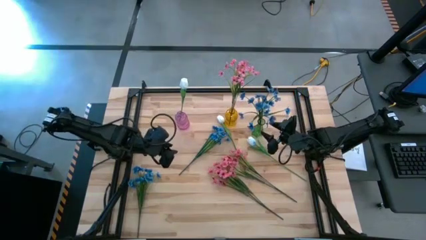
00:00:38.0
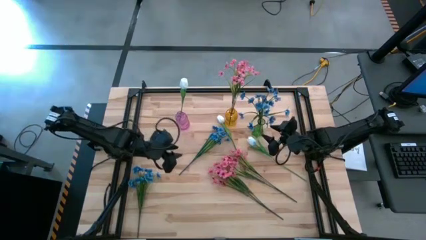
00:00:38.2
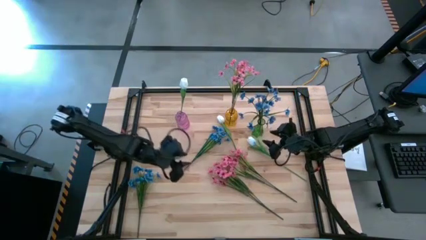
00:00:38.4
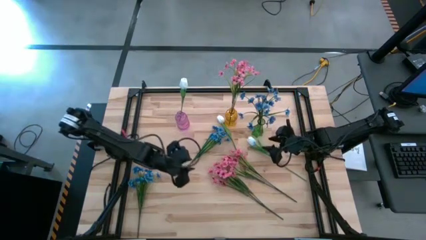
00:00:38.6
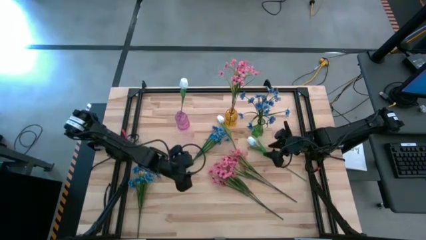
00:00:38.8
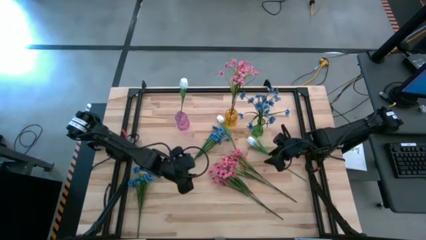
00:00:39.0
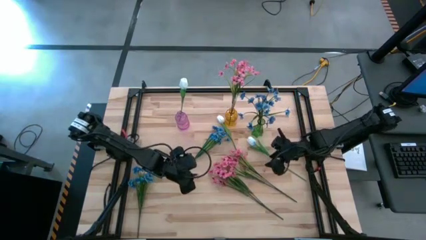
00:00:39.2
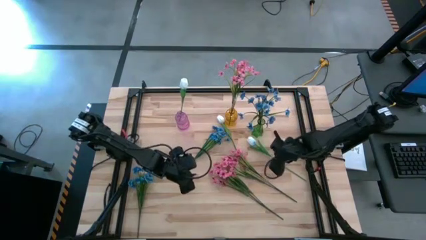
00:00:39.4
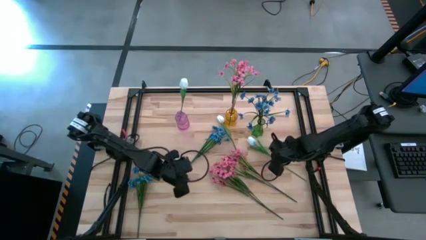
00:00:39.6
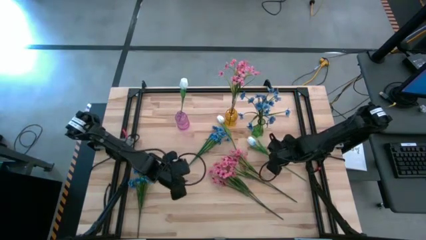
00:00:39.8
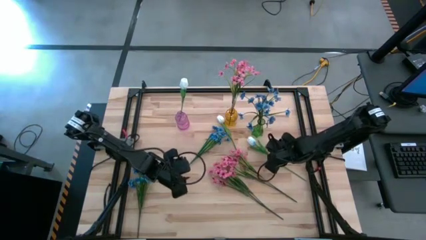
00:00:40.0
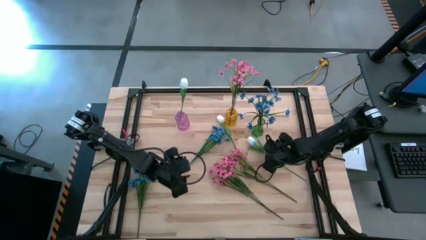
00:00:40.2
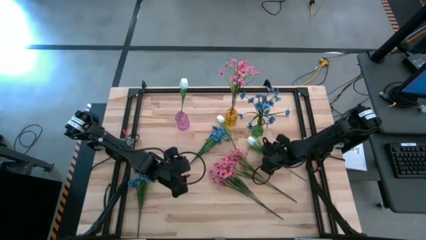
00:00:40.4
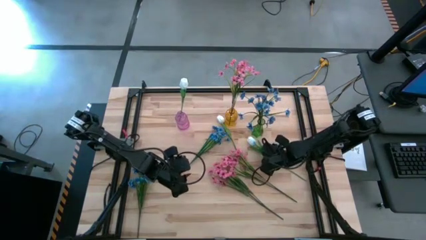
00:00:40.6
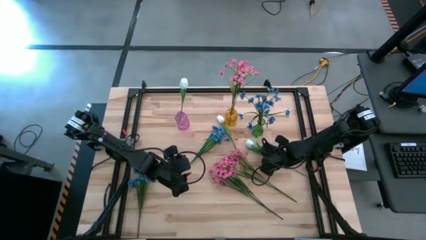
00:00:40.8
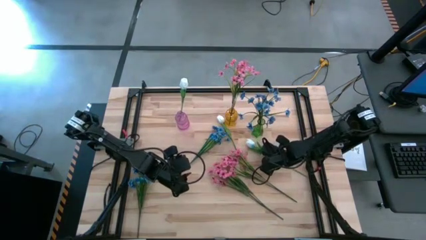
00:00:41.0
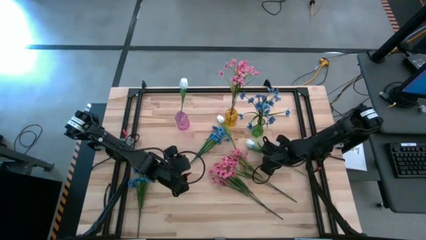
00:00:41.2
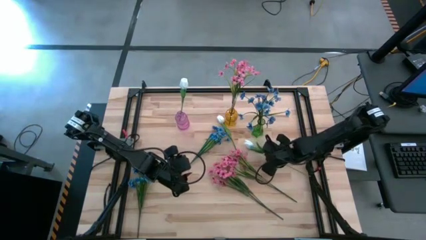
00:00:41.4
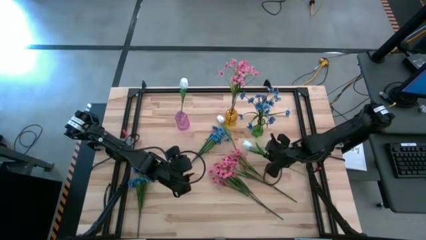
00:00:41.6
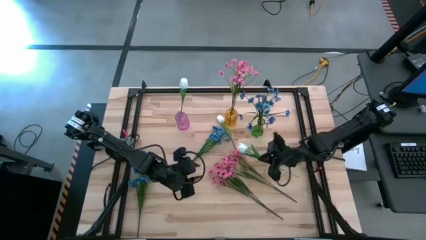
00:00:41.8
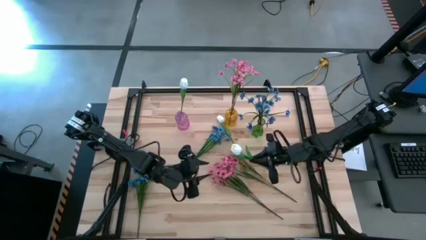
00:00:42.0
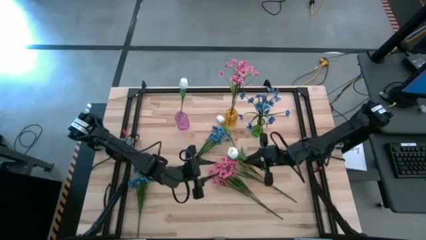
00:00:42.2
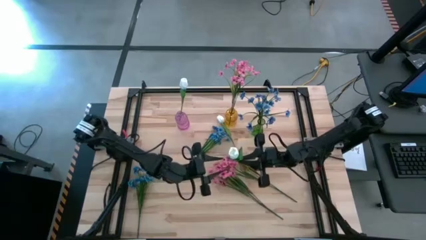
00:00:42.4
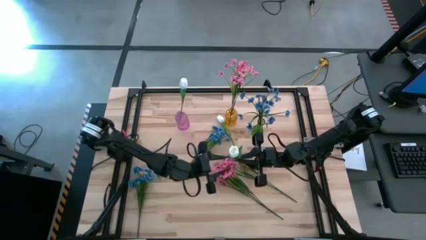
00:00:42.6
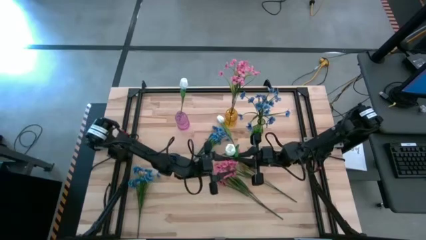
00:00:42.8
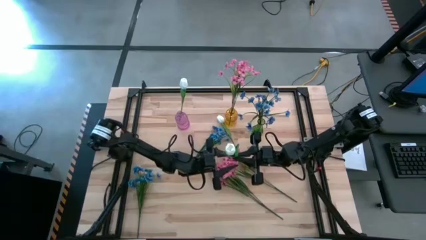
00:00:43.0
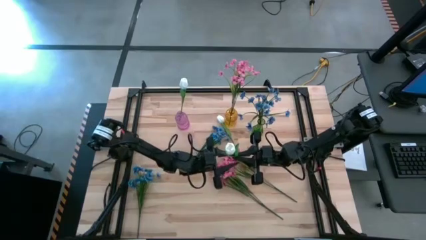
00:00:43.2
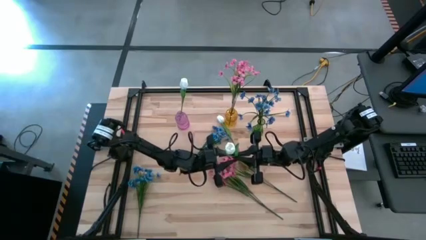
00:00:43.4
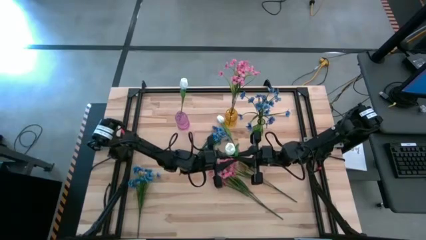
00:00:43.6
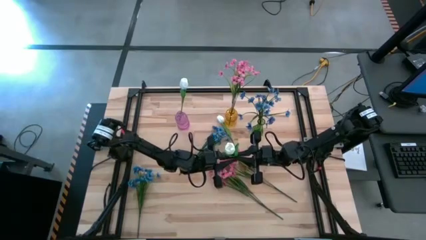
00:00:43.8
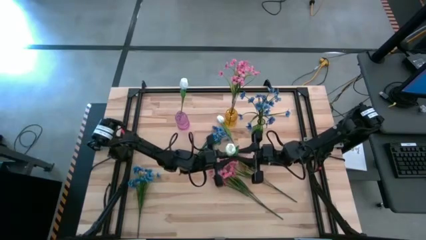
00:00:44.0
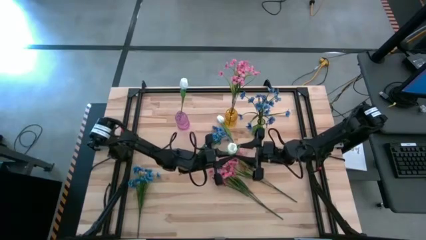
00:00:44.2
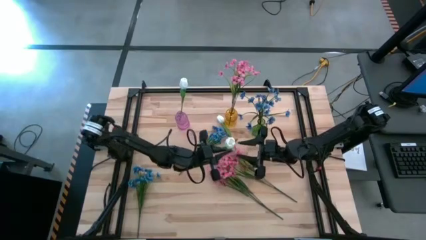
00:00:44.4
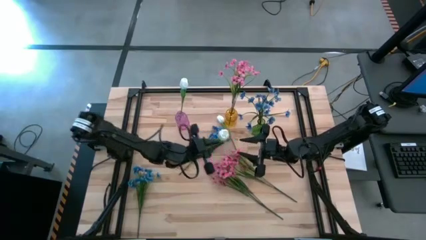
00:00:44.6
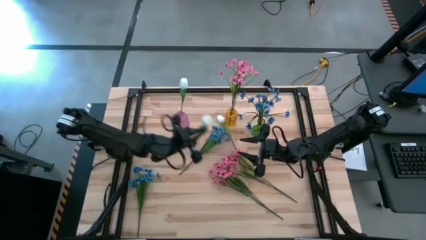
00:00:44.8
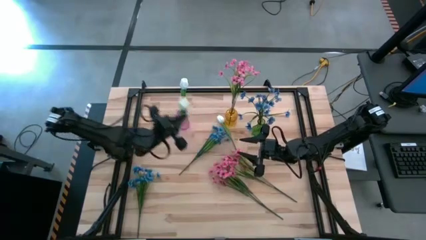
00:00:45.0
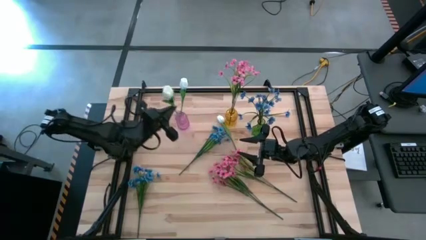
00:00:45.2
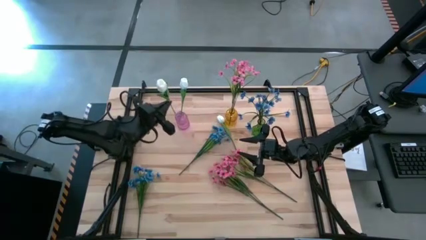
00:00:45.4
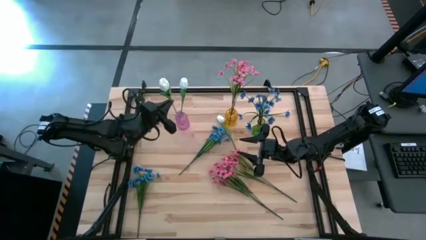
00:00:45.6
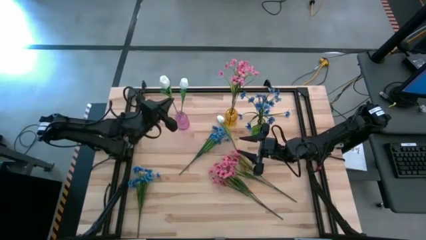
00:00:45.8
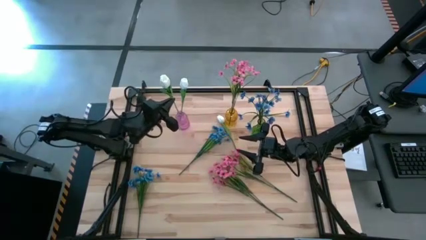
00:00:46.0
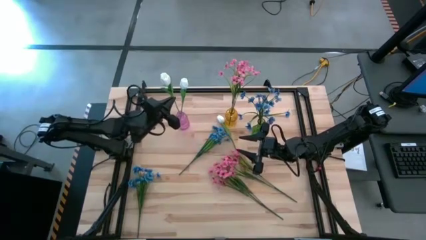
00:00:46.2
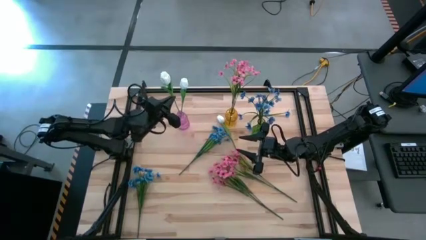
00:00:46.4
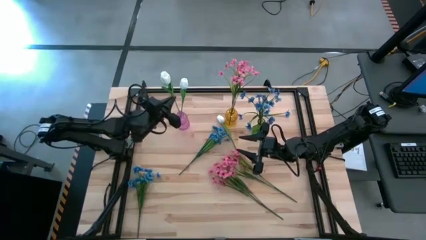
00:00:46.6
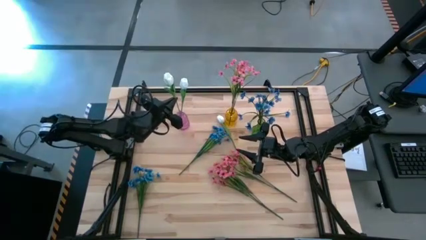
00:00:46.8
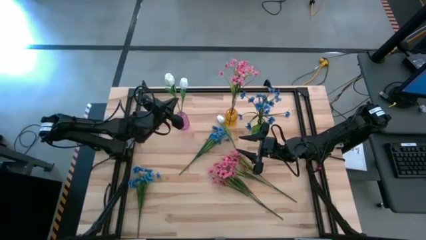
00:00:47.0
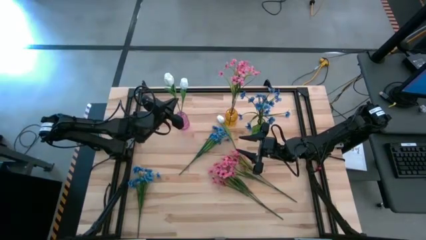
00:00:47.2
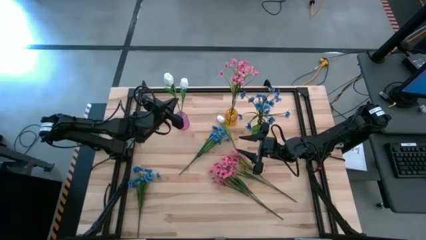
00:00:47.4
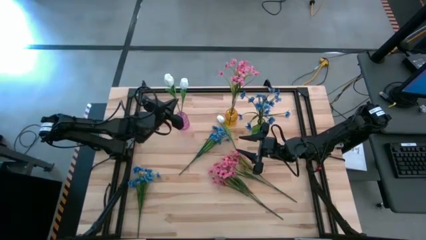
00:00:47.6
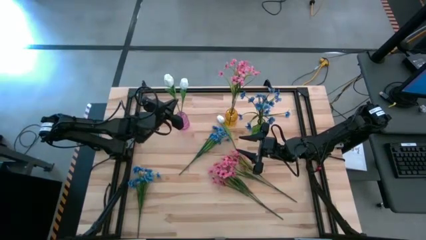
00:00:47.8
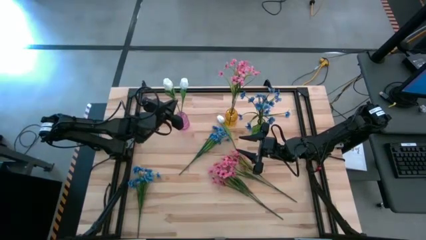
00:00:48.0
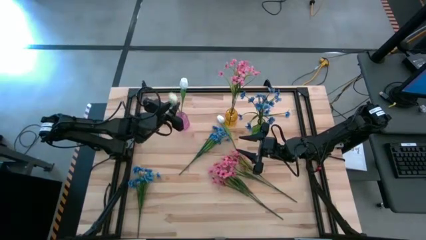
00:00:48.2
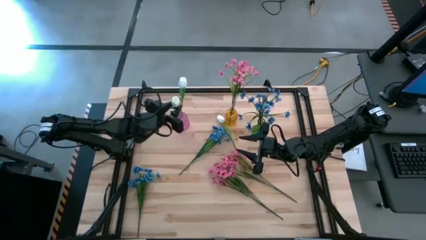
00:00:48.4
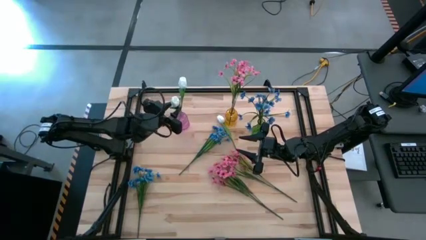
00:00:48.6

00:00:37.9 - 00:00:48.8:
Task: Sort flowers into vase by color
Put the bottom white tulip into the violet vase
